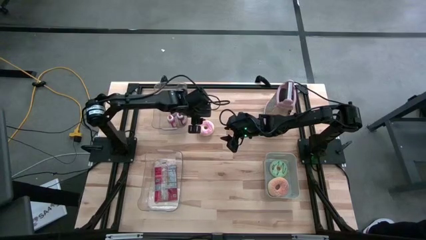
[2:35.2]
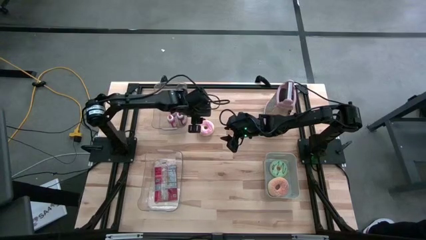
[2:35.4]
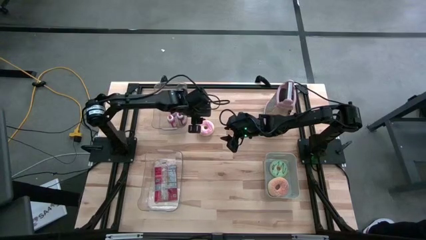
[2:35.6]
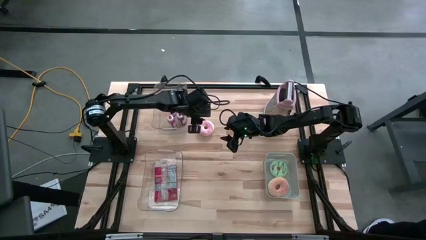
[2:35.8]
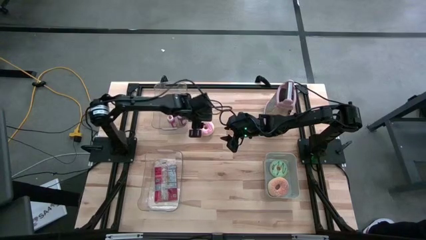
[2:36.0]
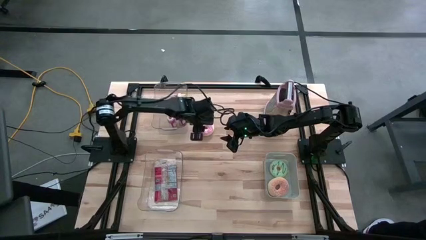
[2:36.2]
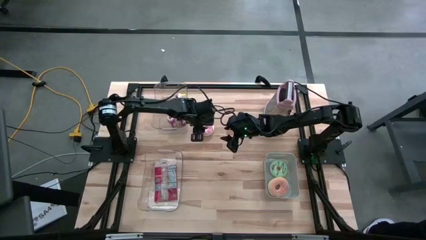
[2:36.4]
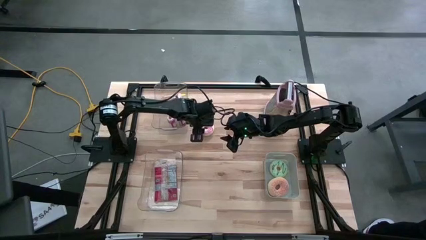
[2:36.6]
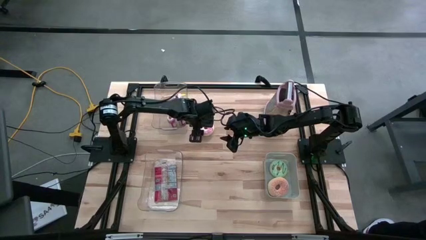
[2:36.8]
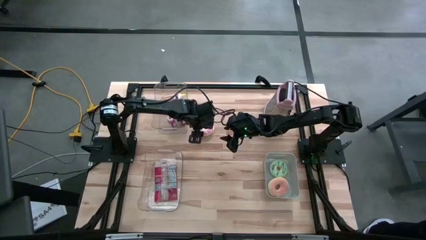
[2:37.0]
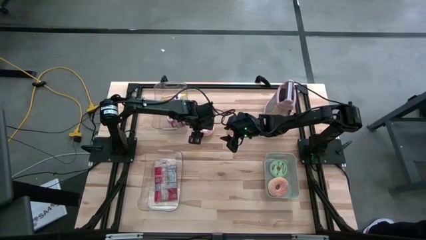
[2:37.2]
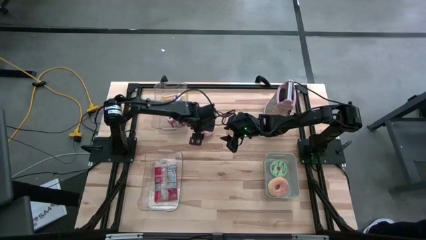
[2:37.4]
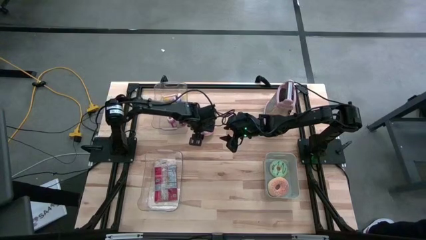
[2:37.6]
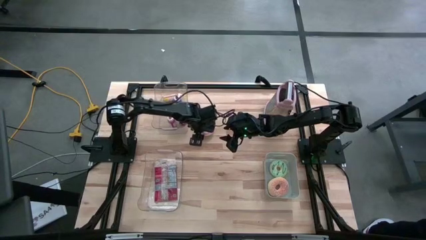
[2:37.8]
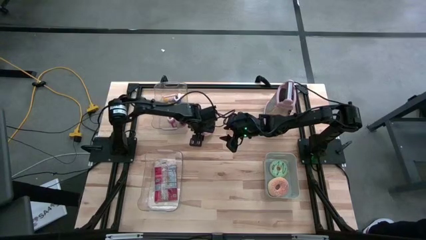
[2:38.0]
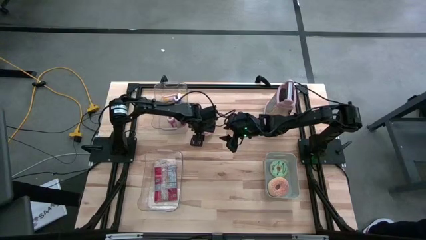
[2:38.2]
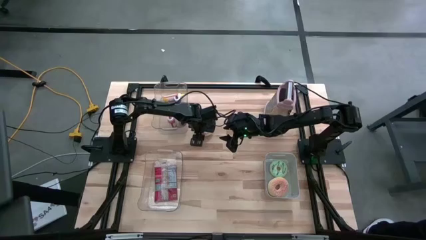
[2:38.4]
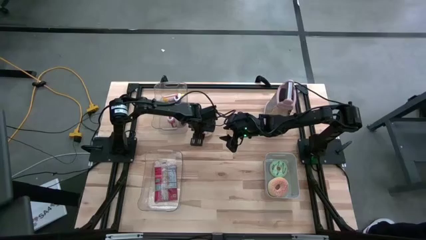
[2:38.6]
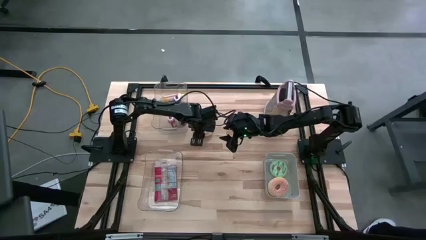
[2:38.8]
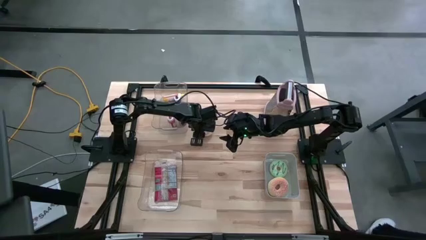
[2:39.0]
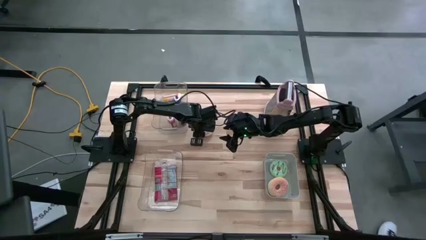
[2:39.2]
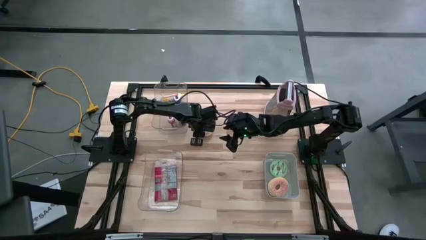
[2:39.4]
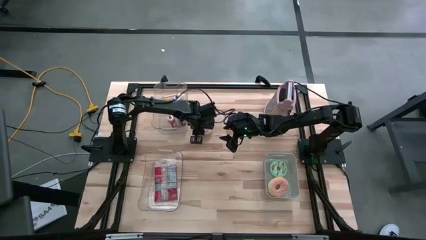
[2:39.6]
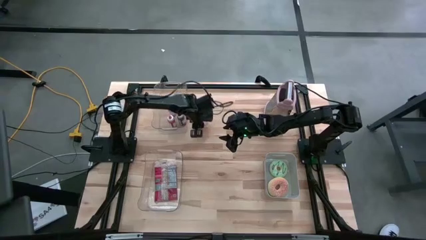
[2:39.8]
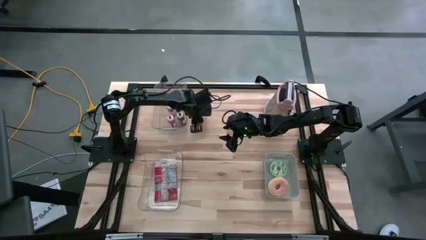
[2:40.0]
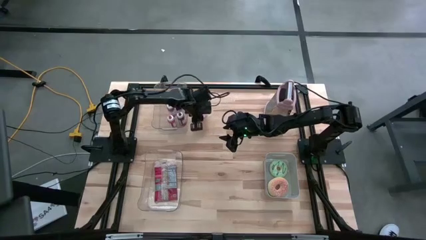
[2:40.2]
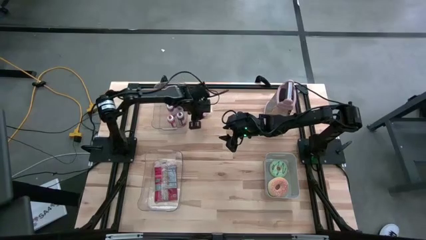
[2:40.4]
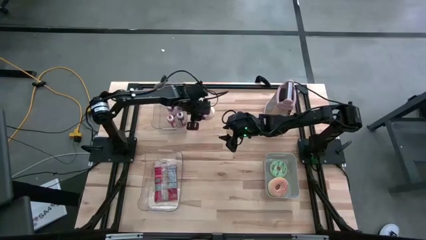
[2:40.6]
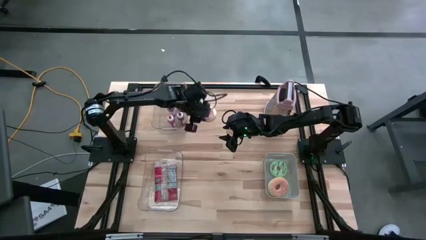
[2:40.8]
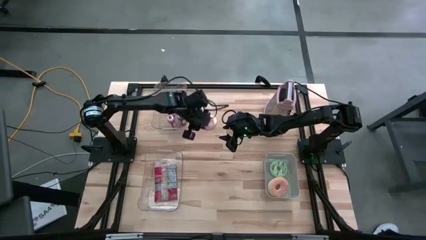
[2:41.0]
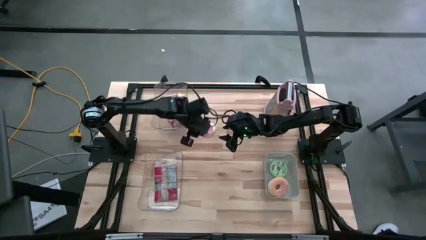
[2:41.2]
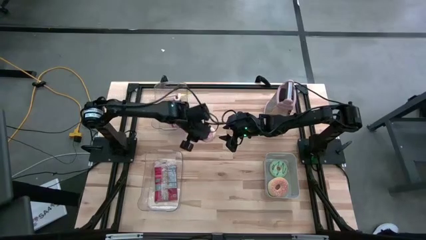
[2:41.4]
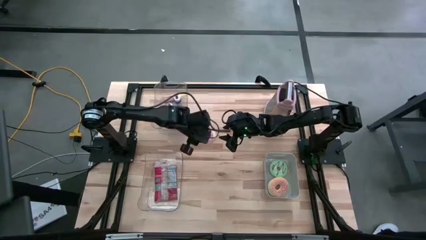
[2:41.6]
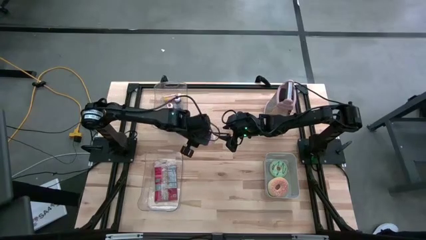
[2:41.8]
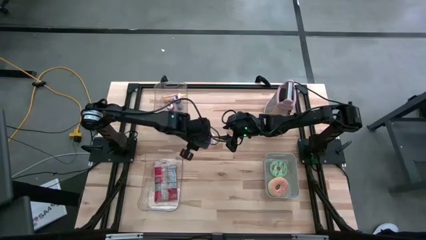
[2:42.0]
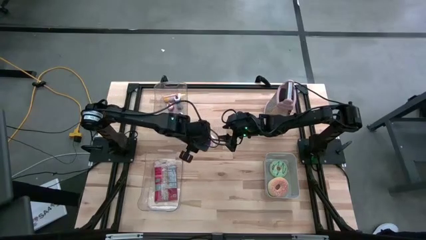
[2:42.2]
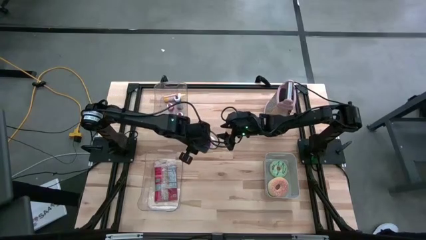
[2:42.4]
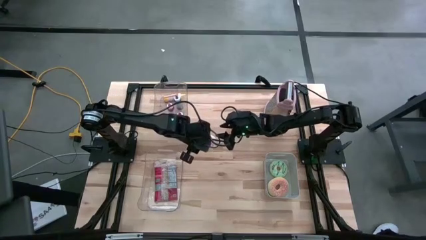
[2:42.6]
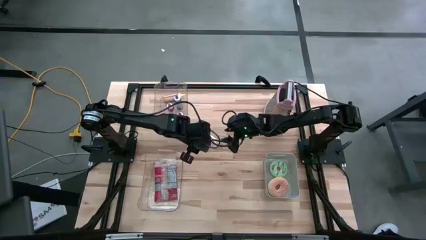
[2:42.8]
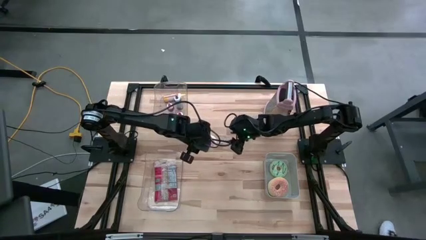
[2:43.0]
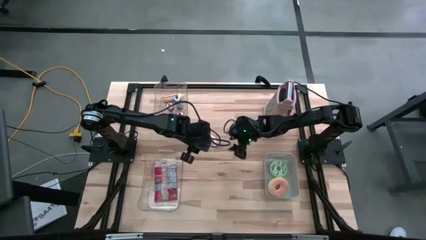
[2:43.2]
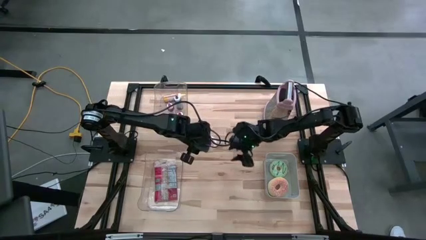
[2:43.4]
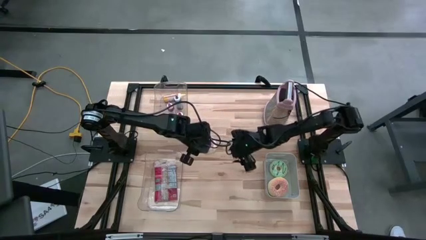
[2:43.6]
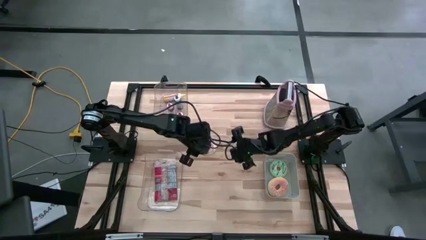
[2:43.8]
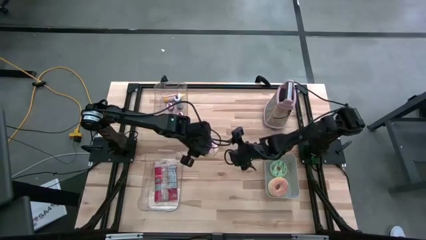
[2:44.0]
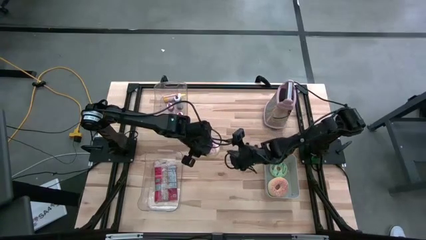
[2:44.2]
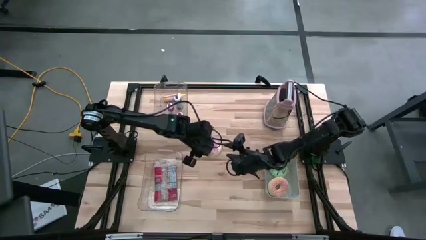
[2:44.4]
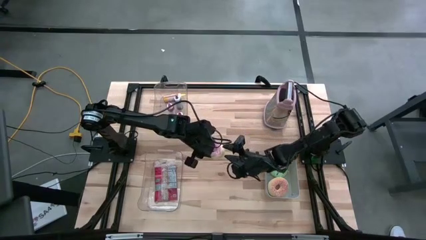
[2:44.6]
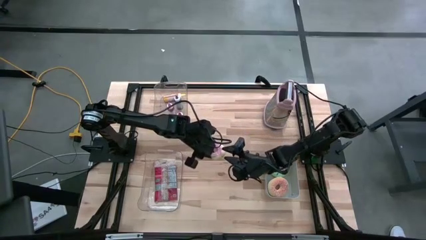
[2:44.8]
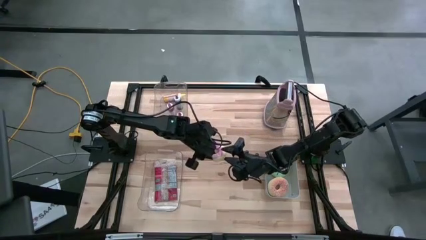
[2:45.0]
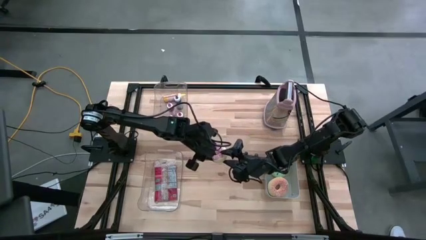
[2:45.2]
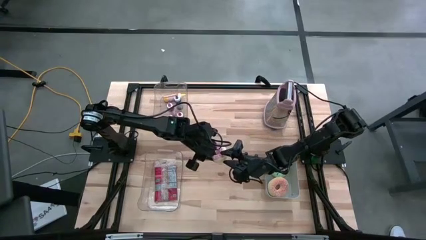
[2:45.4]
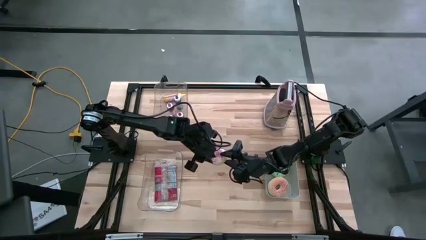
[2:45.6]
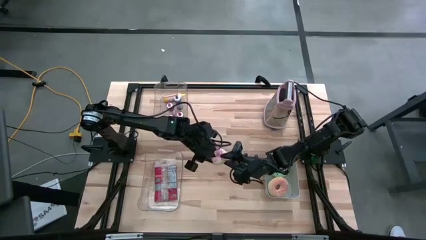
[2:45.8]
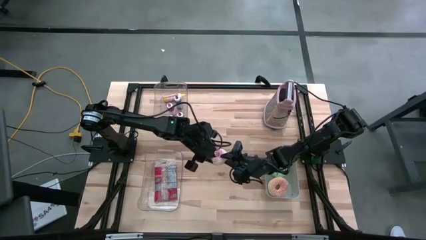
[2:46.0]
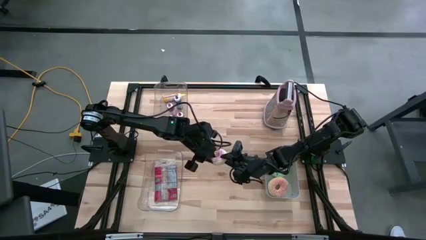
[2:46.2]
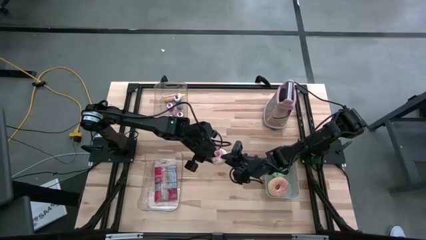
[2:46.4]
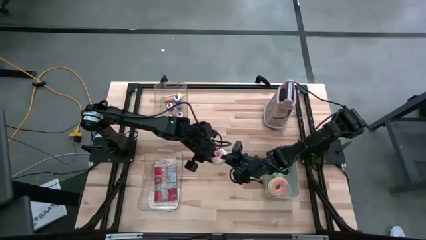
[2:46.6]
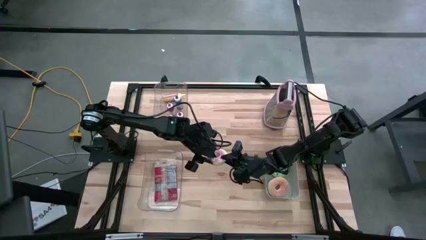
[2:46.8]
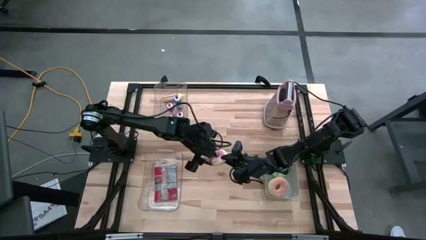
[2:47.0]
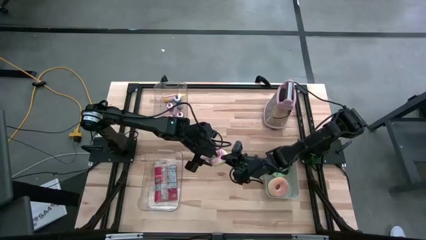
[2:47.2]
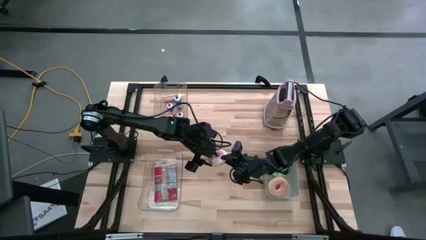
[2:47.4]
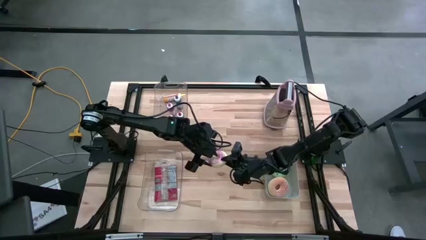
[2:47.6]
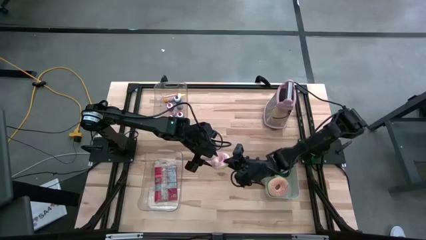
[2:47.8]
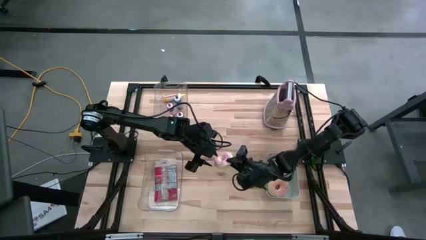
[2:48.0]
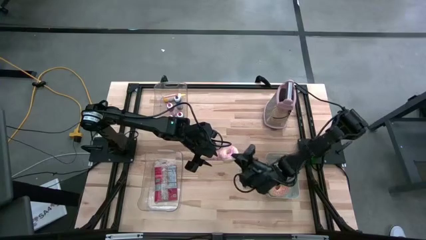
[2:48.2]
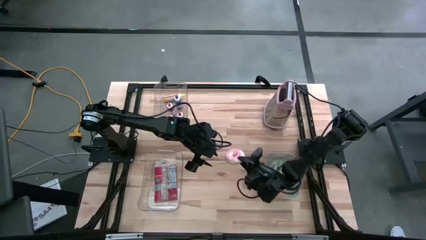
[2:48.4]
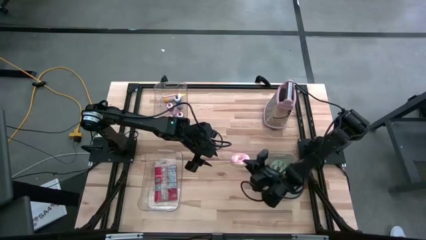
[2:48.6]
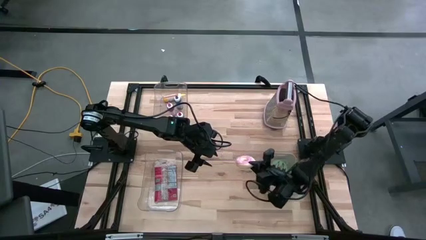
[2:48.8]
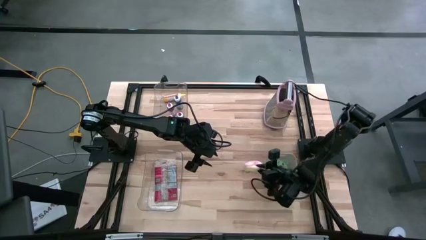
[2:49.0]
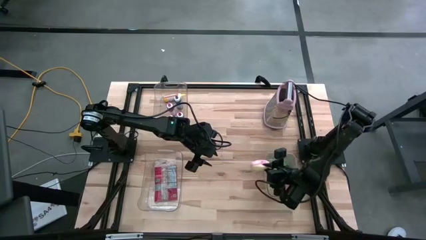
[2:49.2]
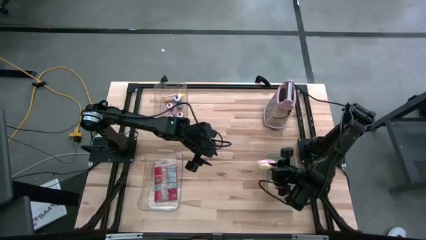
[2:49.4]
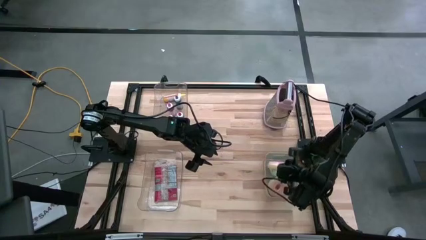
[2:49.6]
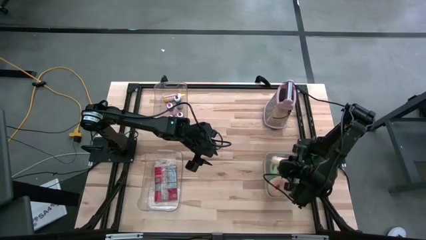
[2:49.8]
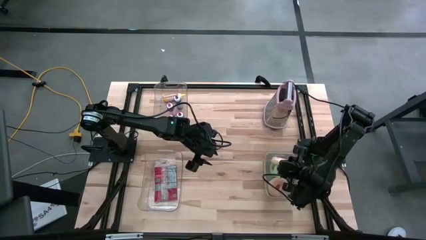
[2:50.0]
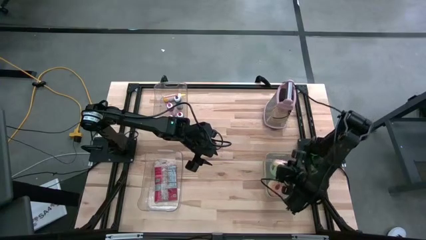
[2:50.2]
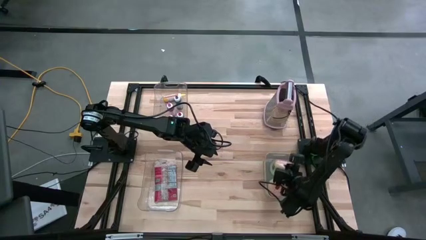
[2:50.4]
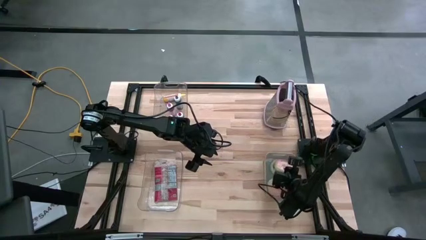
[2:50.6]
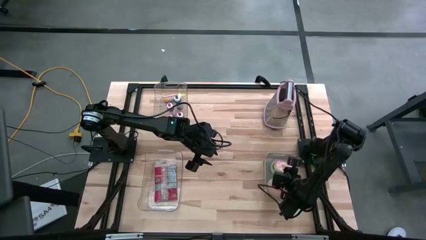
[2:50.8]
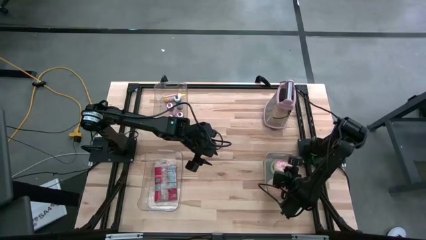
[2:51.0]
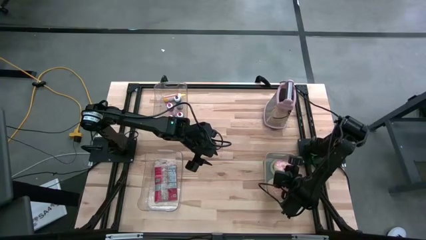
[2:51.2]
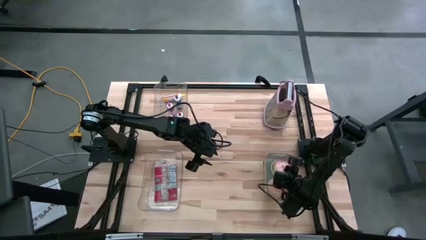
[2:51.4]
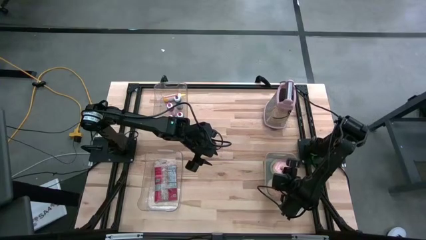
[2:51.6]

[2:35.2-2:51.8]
Put the pink donut into the gray bin
